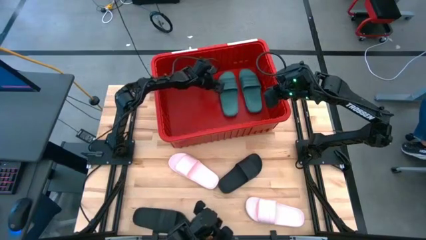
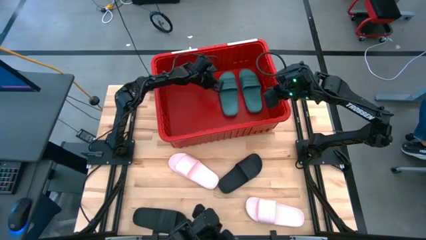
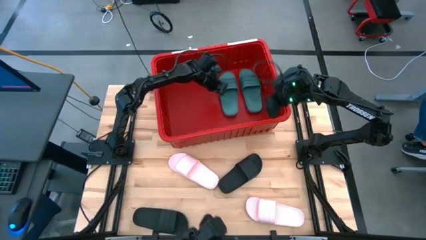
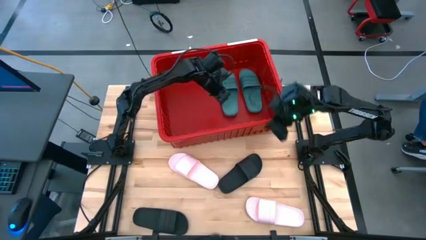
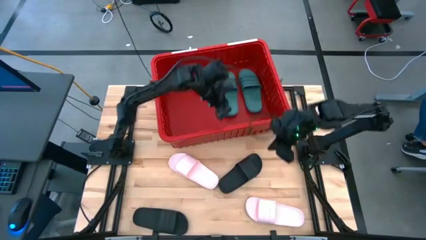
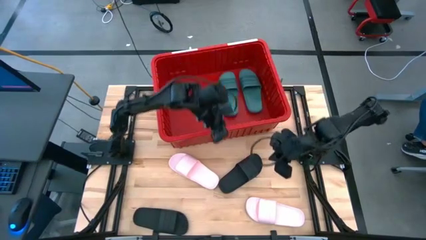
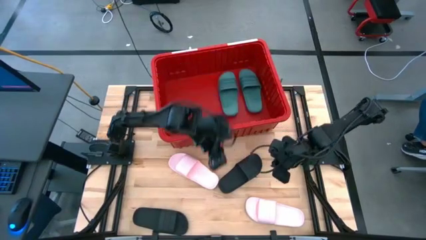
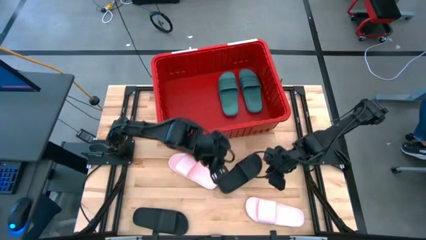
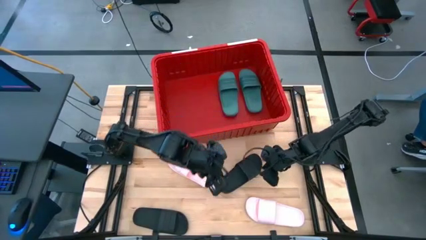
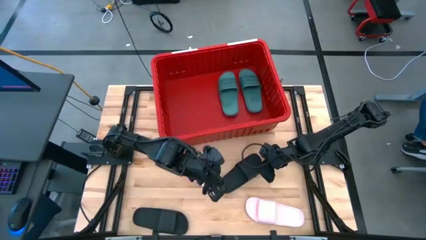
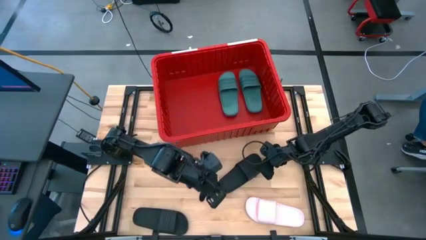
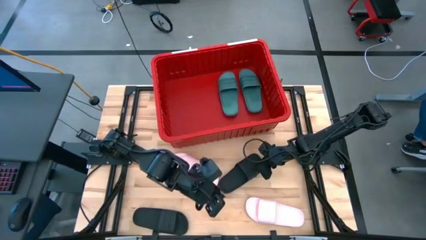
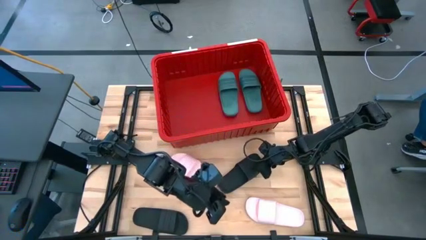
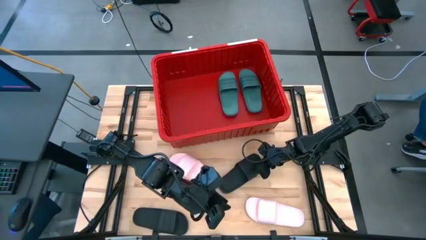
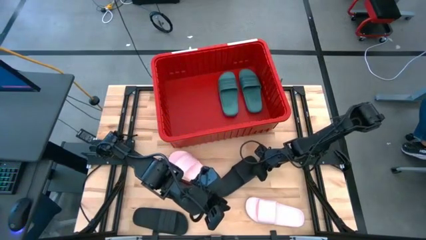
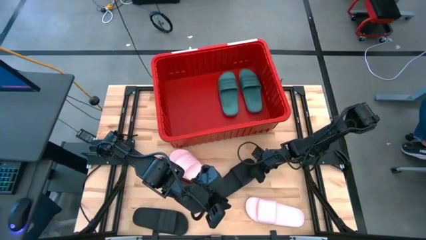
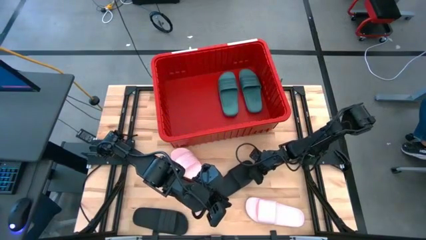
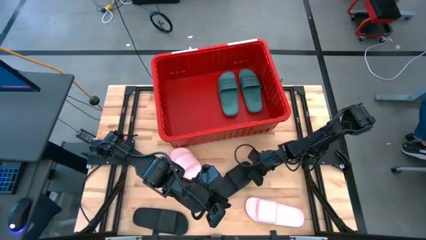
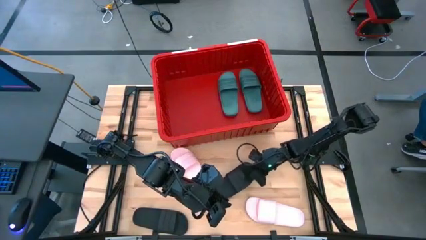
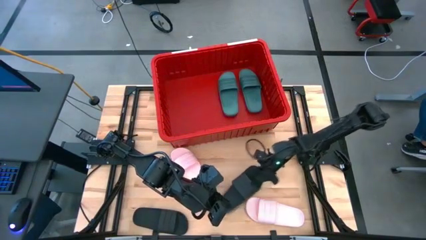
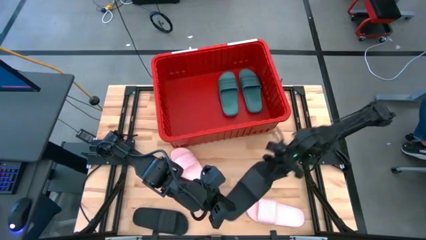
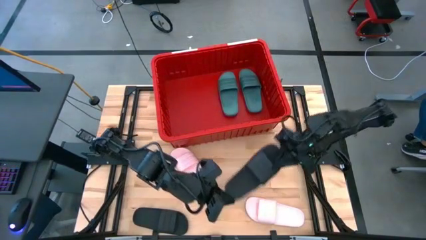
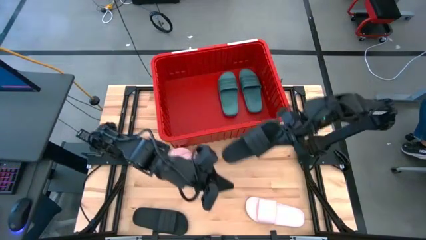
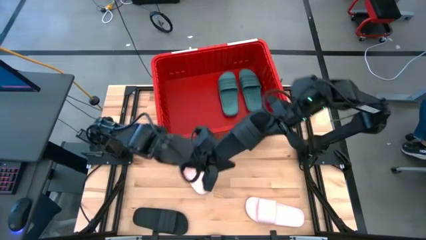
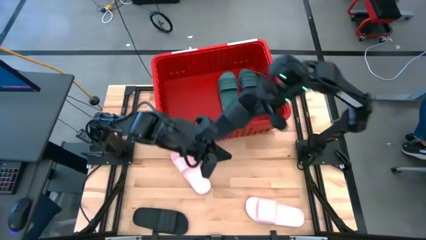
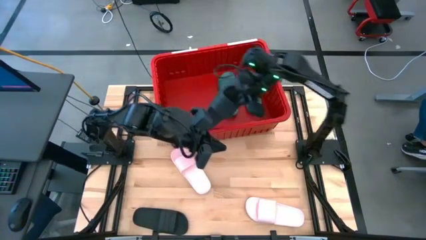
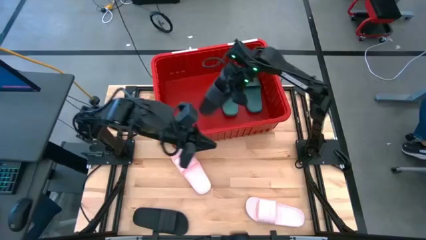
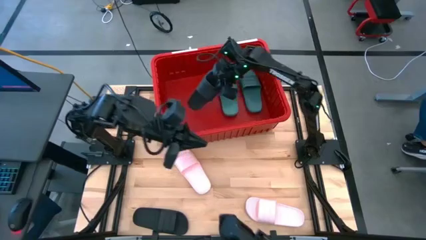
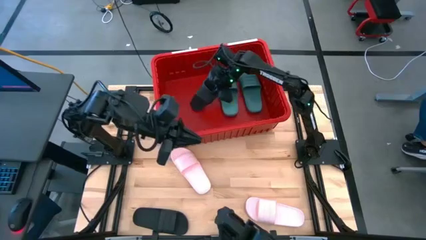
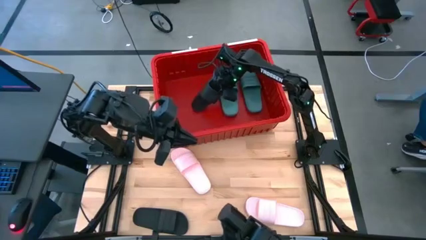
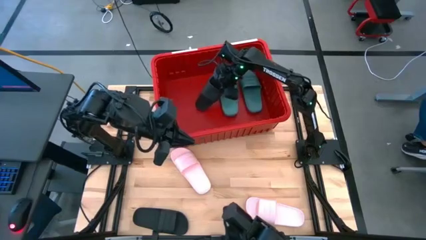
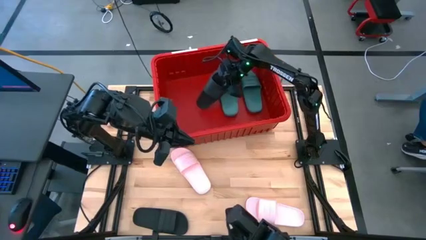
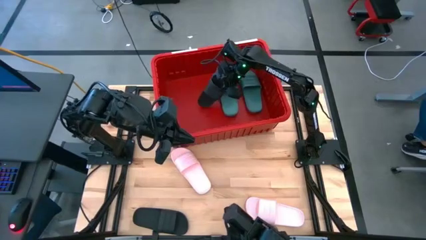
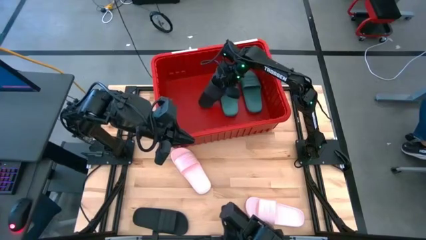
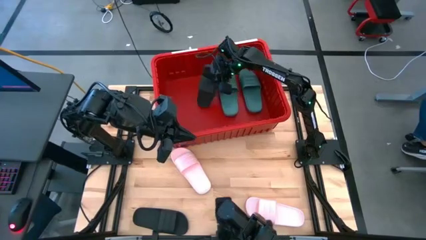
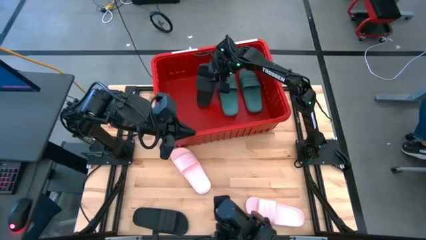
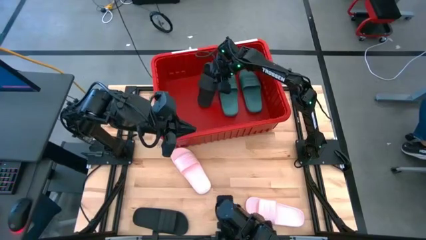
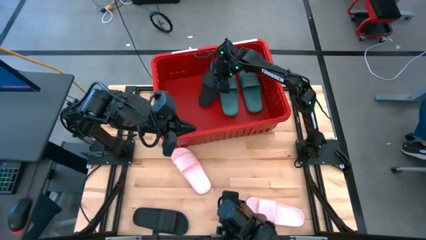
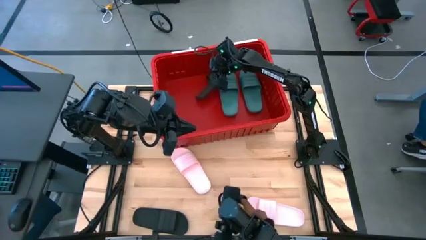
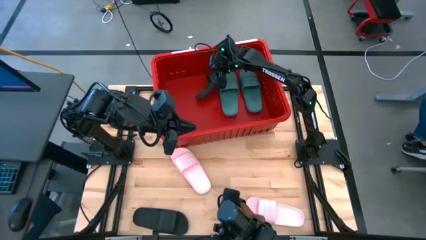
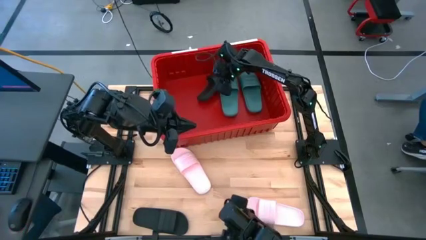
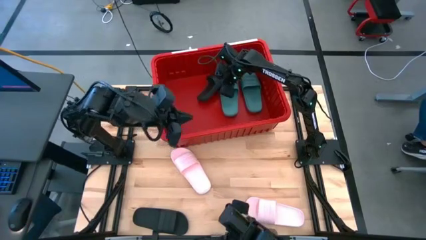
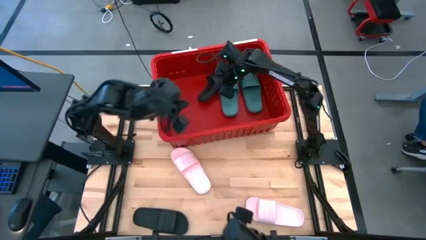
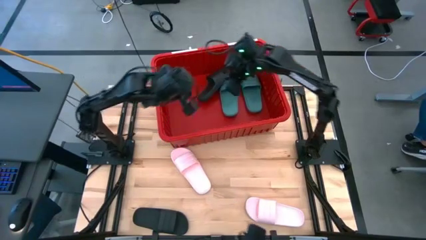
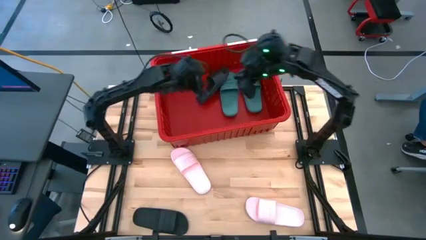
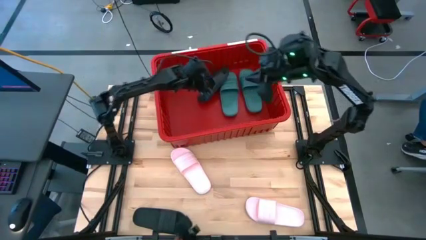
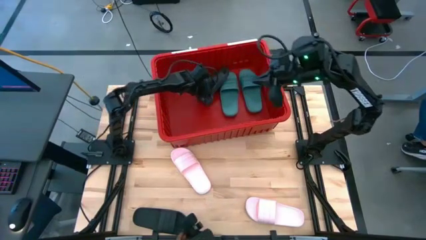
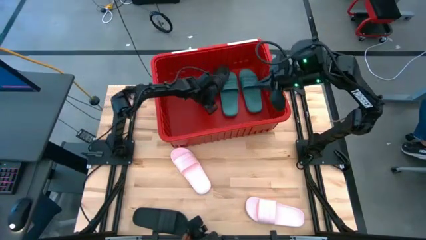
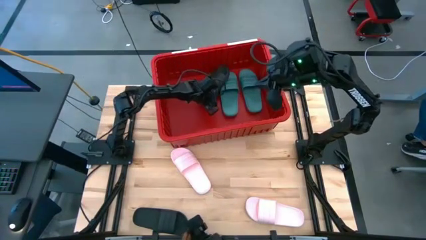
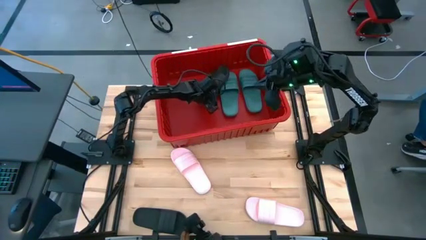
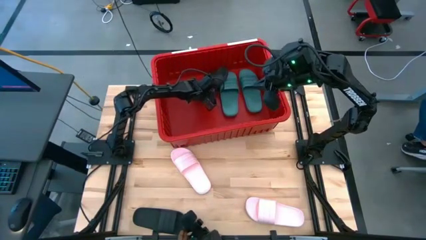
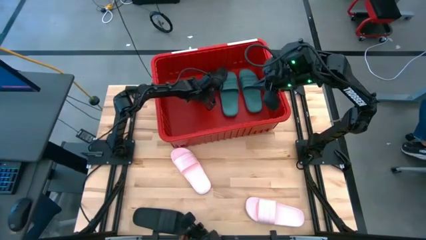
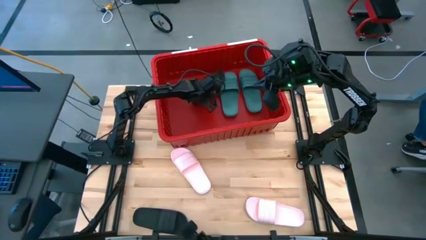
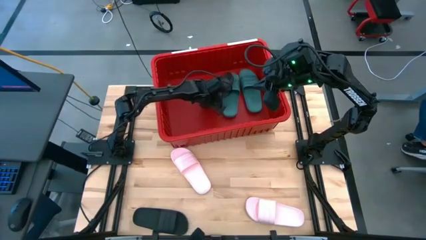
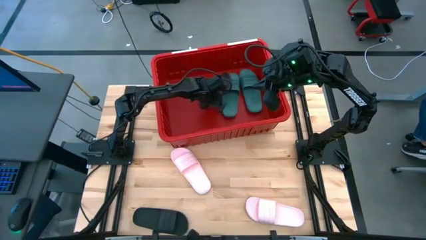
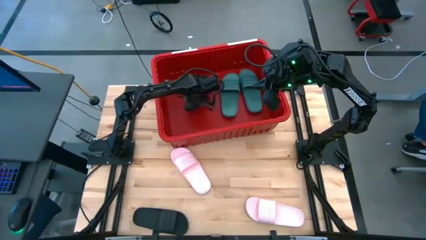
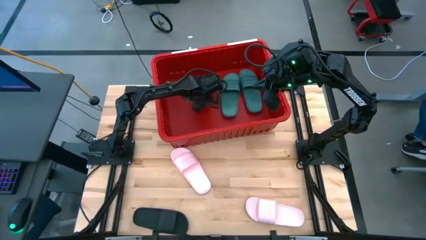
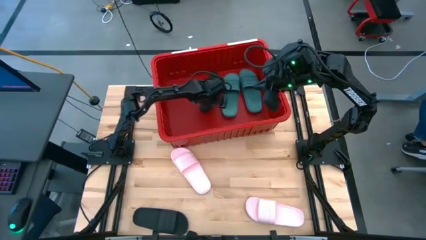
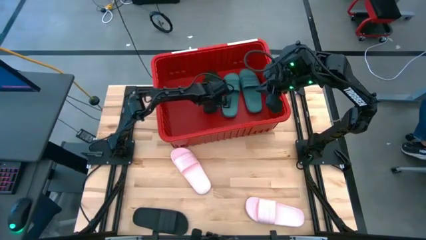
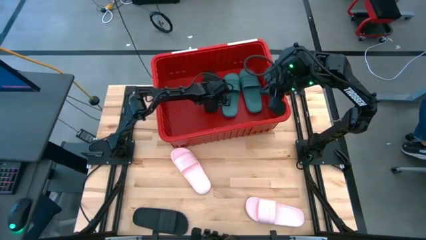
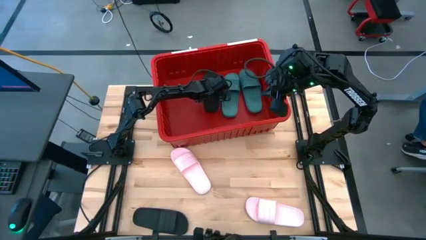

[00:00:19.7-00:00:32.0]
Task: Pick and place slides into bin
Put the right black slide into the red bin

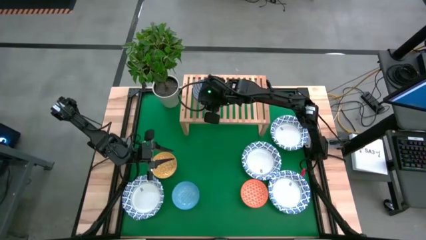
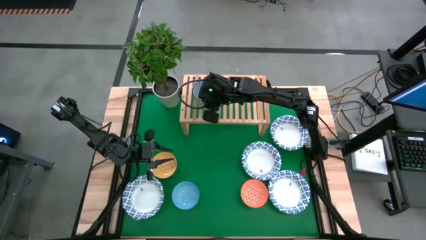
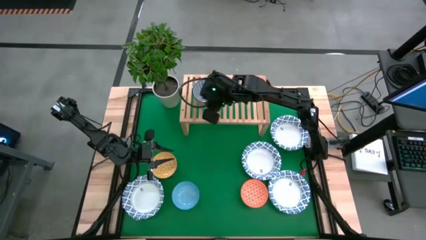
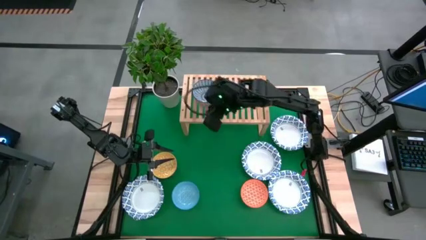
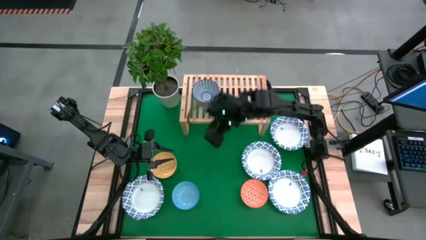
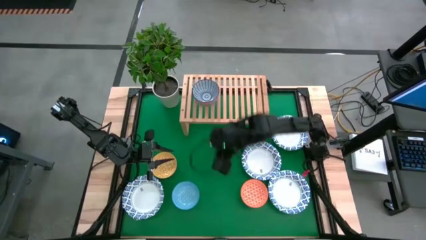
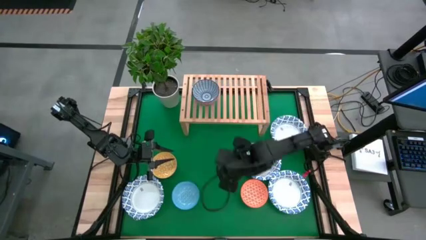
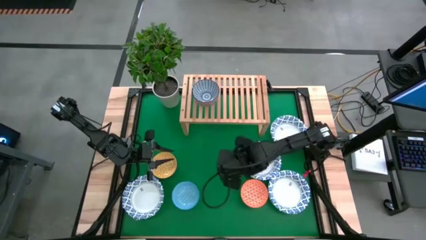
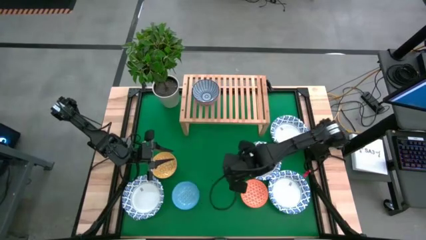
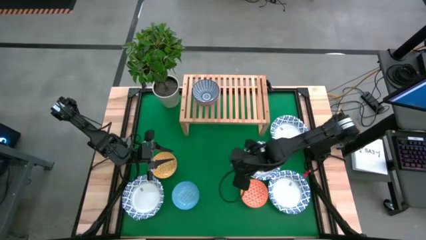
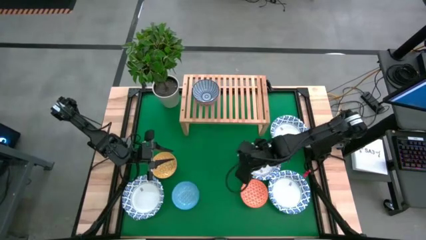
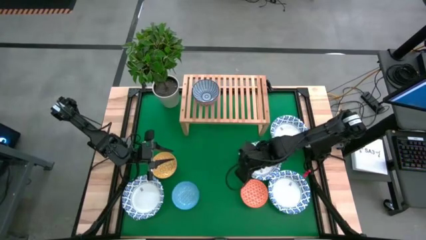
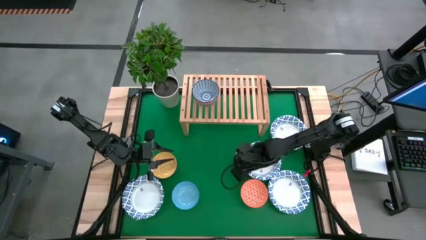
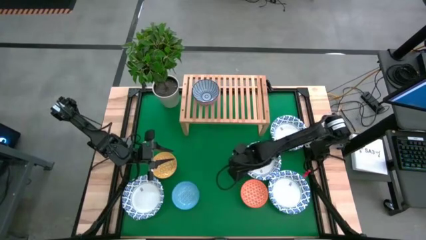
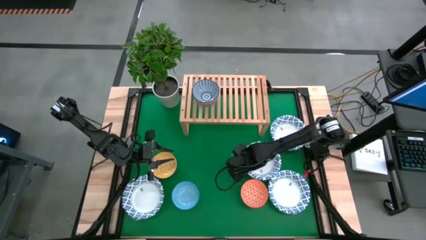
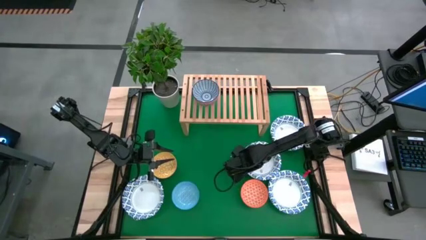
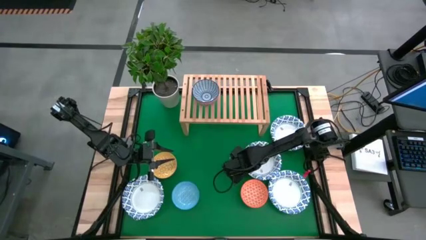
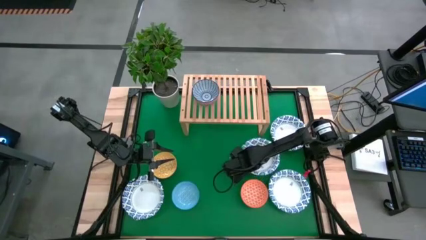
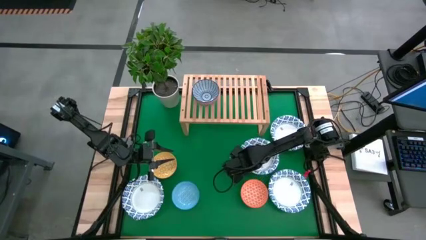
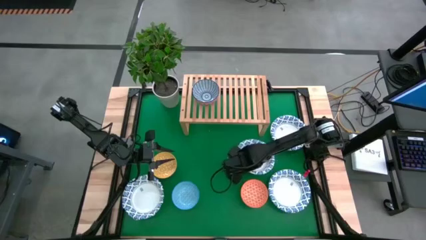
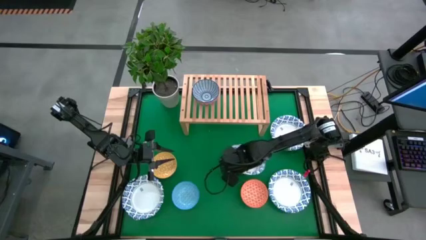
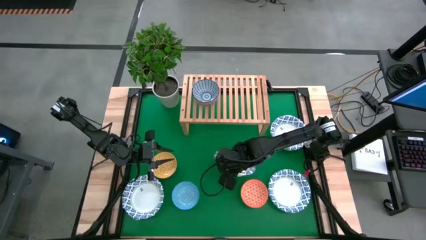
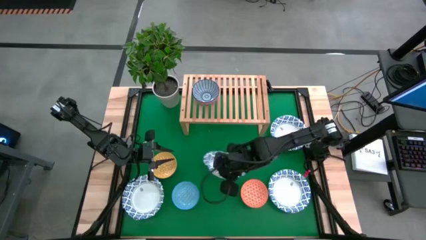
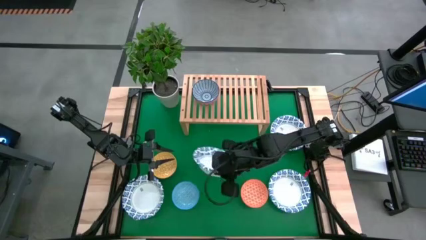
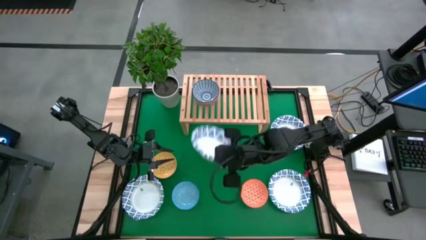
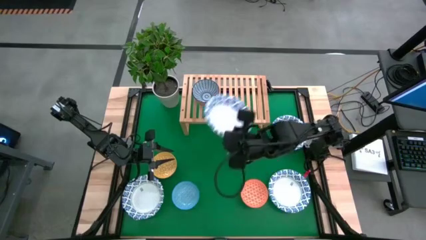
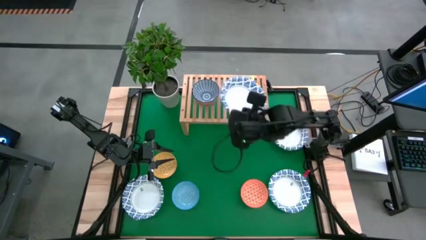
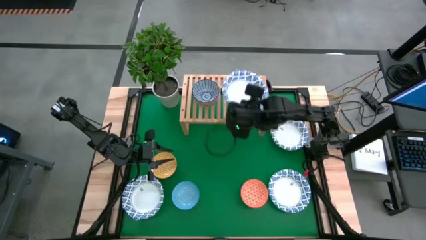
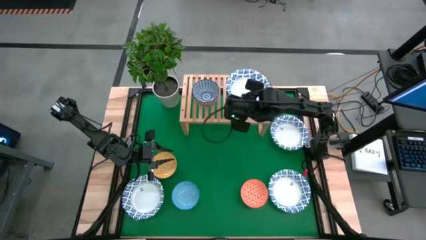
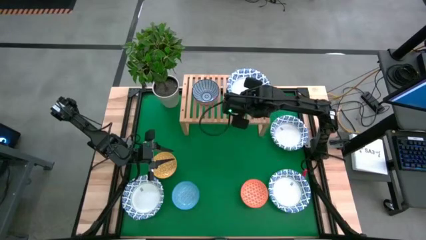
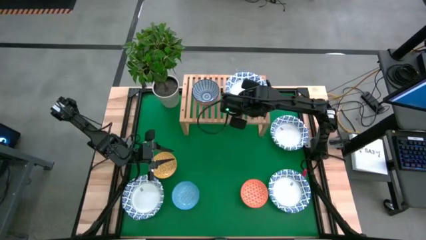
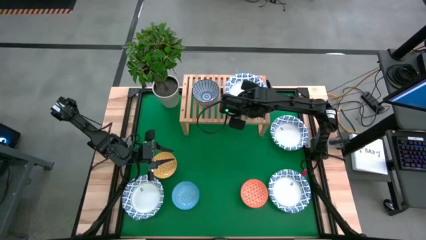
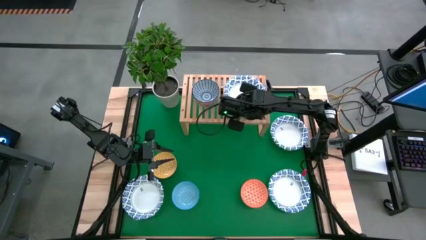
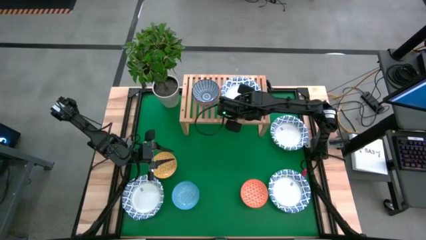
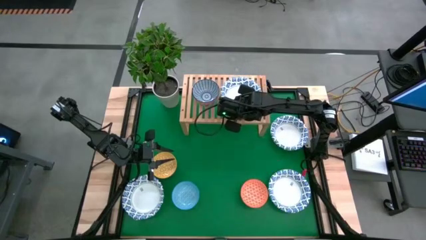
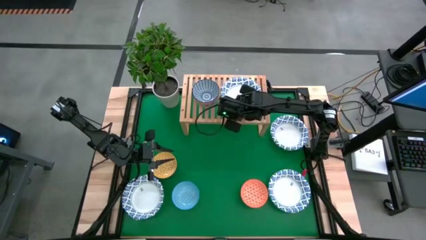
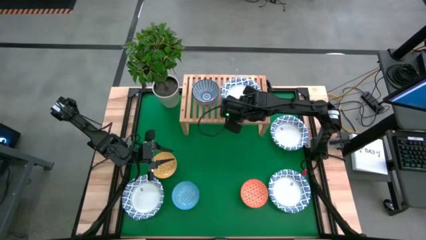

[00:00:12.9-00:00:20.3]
Task: Place and stack bowls onto a shelf
Put the center white bowl on the shelf
